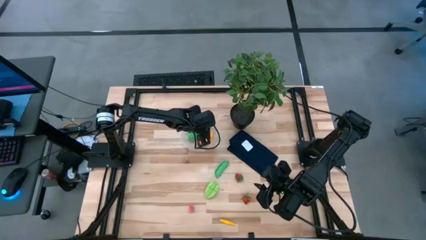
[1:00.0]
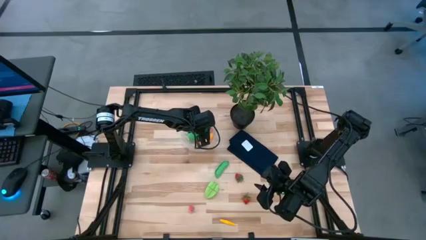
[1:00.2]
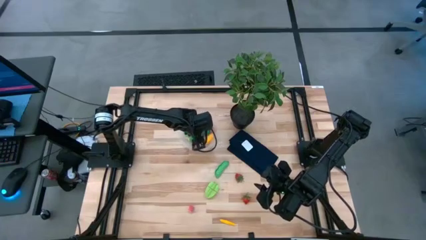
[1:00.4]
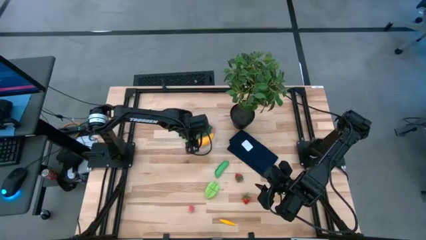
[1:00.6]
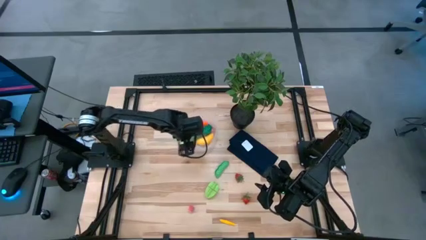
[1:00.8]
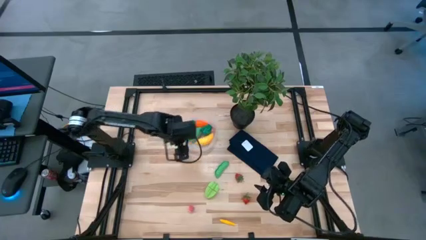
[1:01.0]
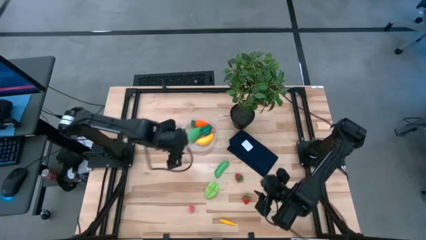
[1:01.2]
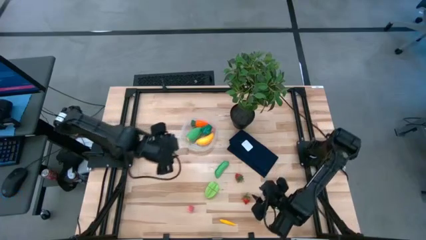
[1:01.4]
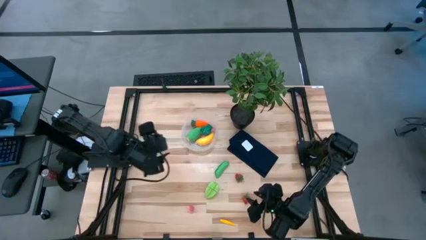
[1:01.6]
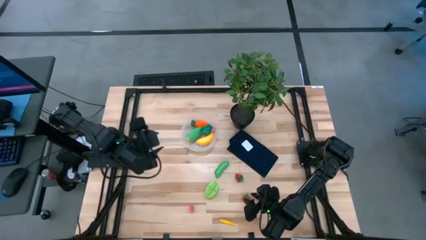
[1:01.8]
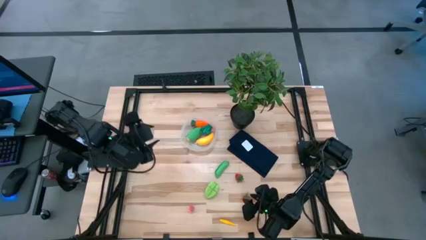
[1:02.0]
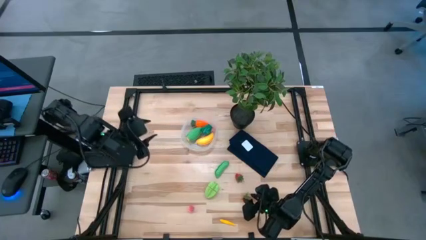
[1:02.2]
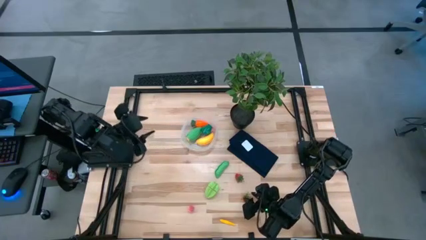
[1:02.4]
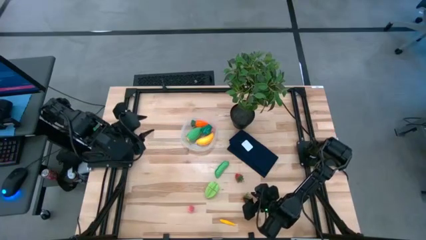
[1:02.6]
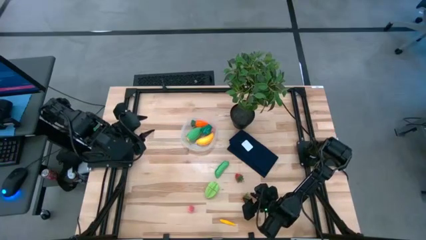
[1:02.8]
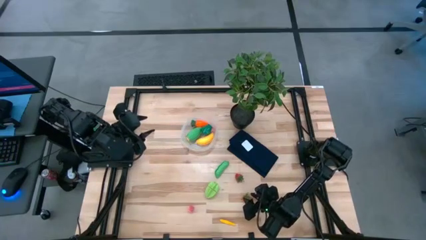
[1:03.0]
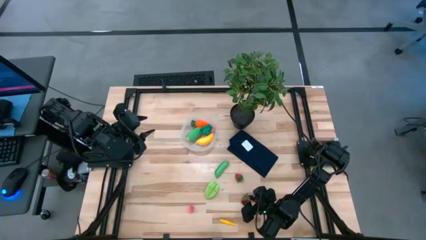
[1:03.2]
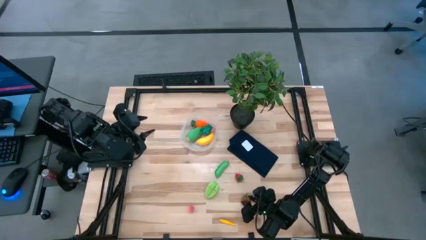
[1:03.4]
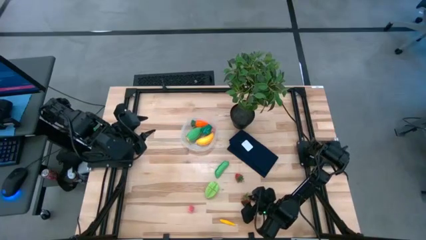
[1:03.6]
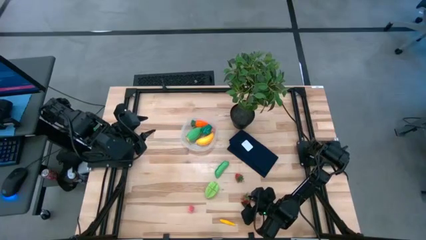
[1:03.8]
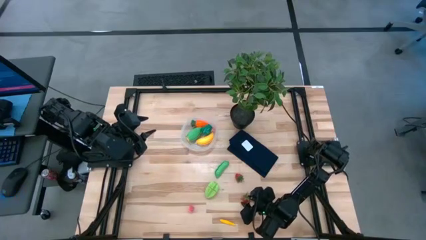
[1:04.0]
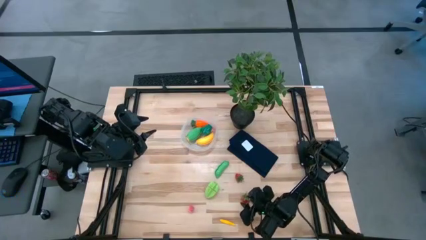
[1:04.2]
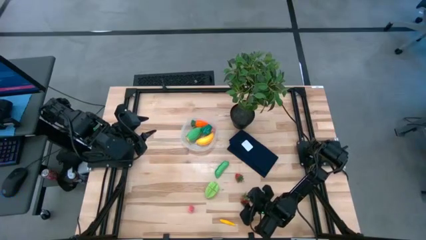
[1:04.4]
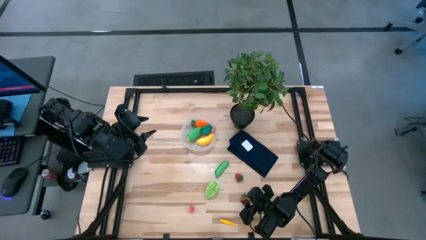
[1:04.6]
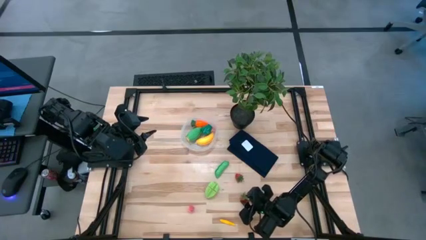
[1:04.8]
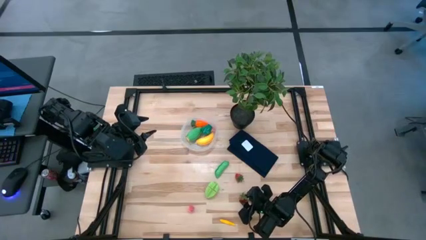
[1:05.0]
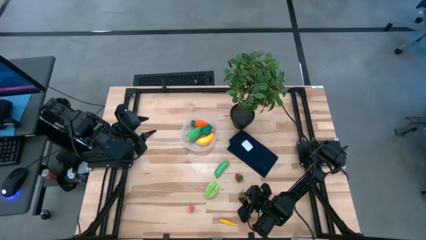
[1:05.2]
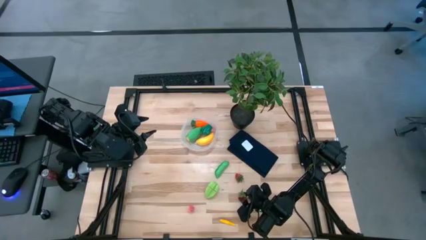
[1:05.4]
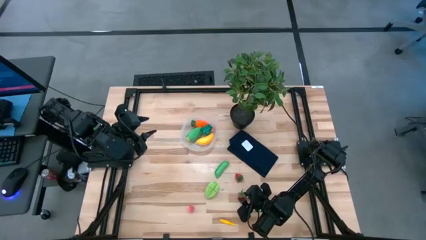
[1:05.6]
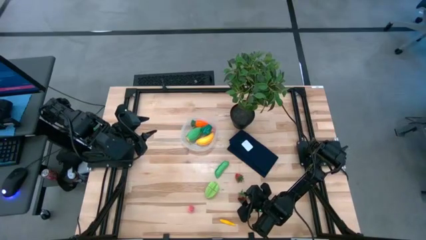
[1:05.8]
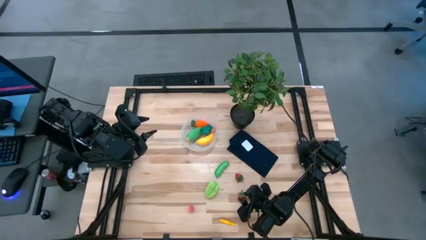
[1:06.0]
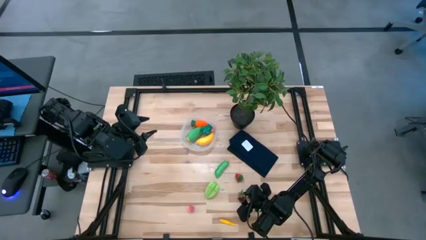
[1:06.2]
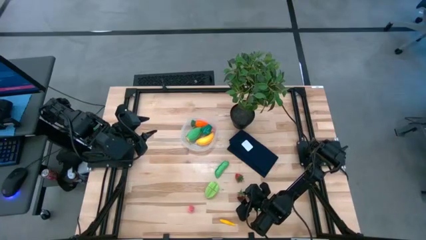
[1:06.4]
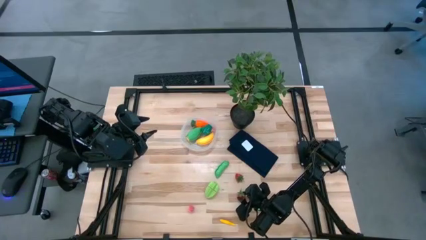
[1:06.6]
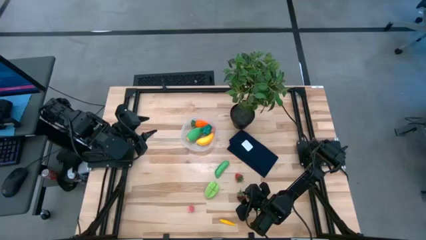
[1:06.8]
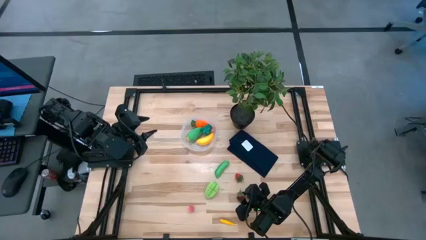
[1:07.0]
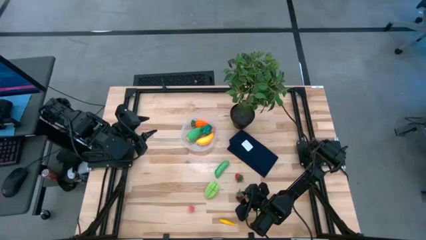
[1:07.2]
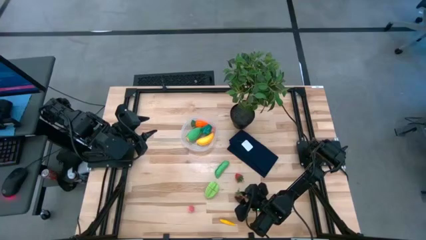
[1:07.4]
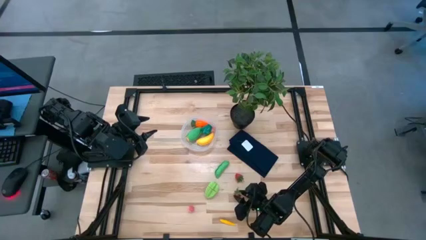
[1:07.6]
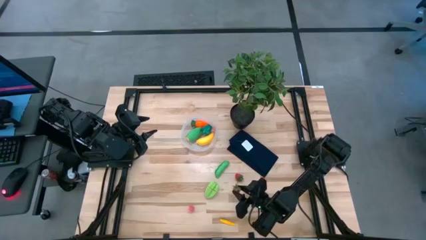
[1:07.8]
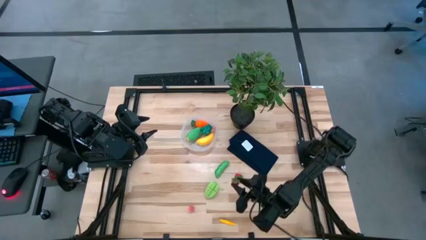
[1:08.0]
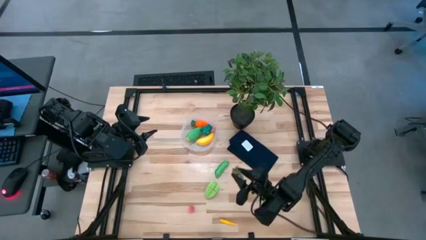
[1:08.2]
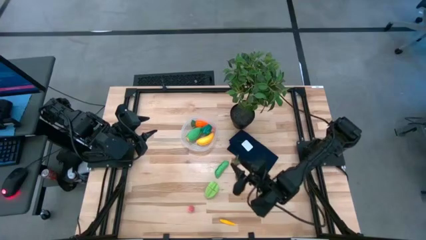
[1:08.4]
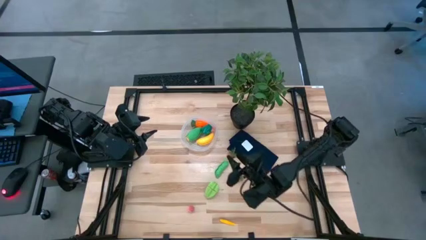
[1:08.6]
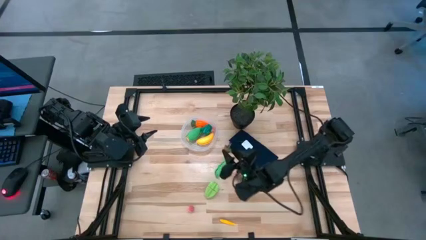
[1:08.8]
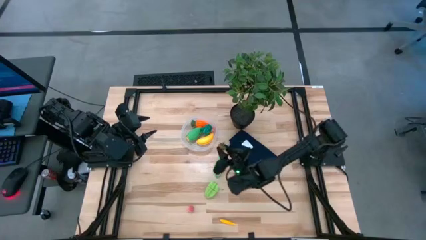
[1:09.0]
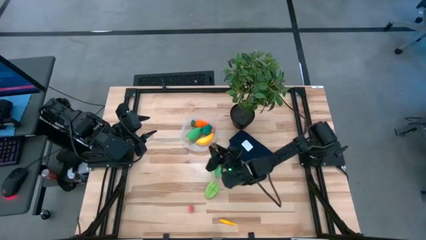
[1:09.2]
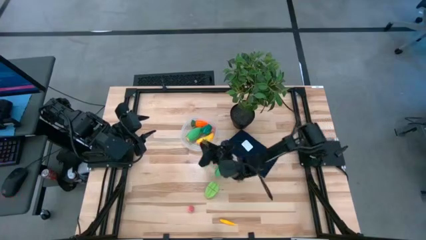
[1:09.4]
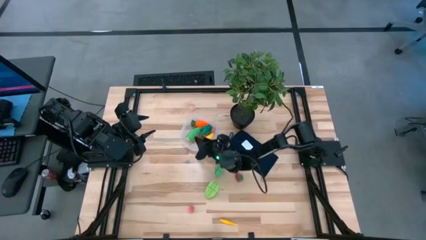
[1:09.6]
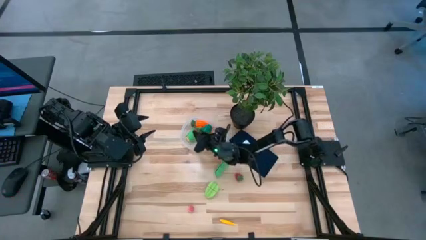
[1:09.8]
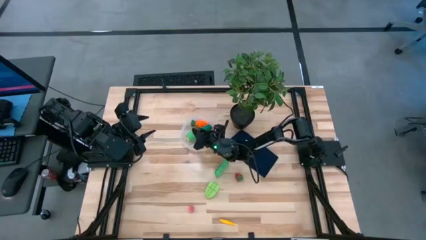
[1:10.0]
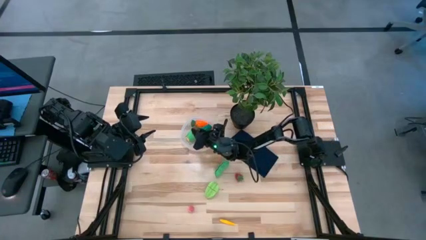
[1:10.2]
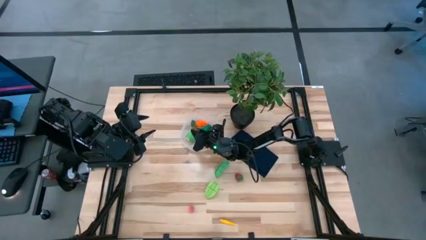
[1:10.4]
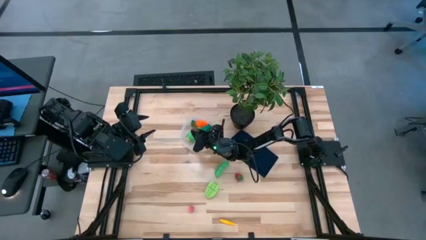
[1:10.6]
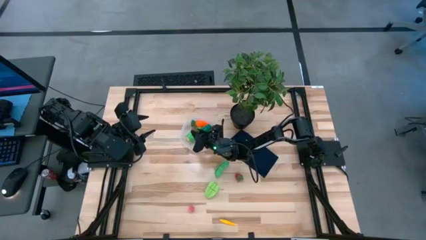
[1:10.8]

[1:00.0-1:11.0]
Task: Pick and placing Produce into tupperware
Put the bottom red strawberry into the transparent bin

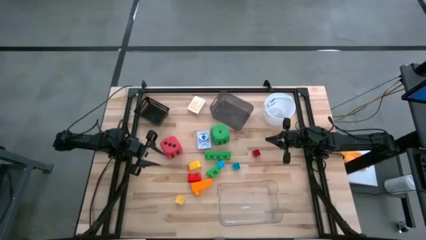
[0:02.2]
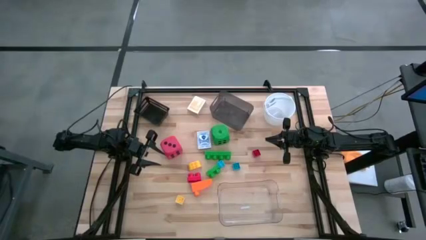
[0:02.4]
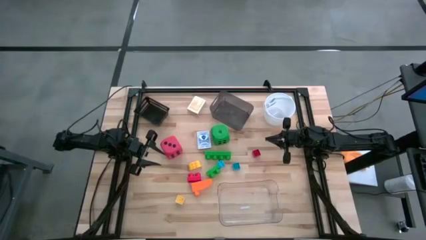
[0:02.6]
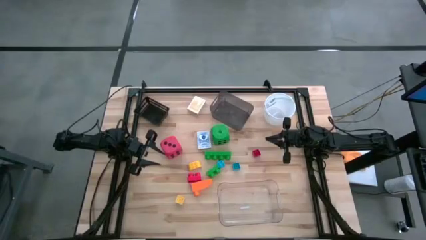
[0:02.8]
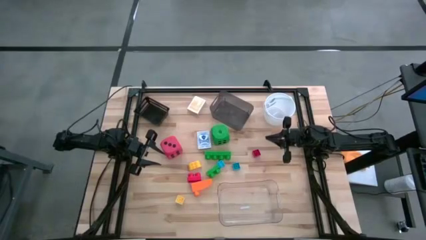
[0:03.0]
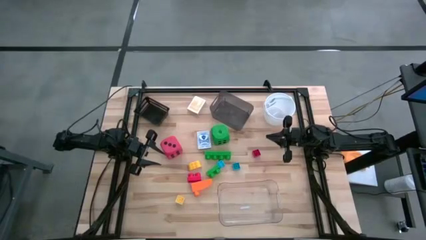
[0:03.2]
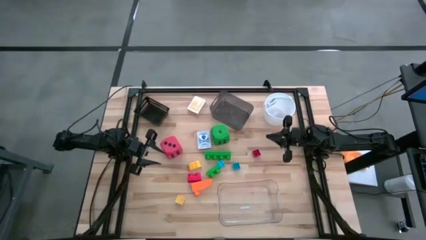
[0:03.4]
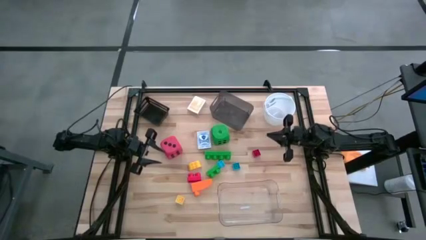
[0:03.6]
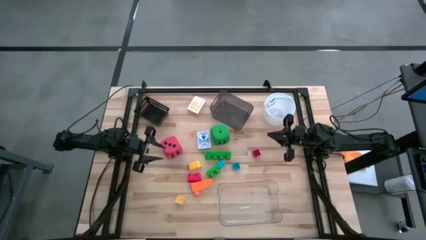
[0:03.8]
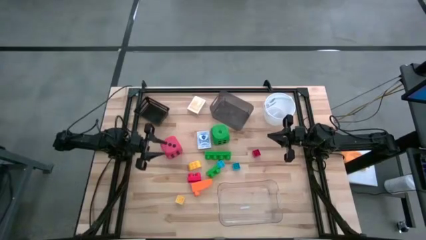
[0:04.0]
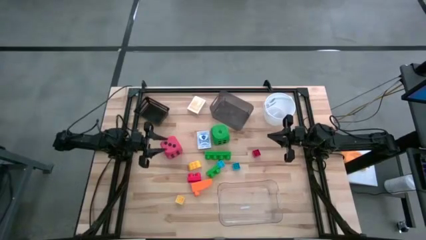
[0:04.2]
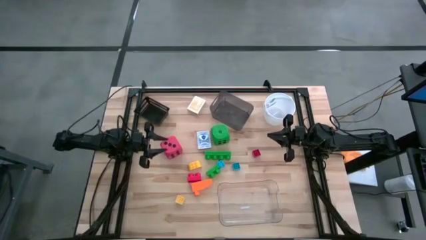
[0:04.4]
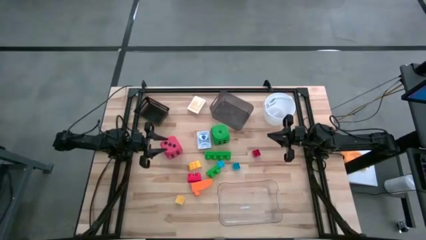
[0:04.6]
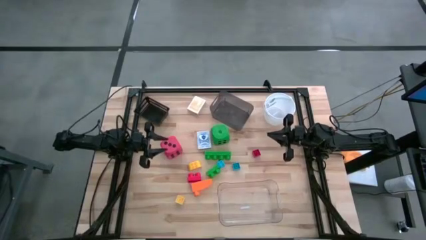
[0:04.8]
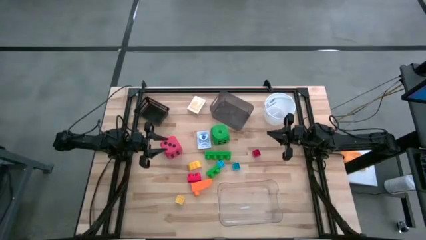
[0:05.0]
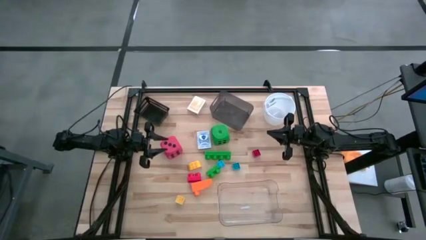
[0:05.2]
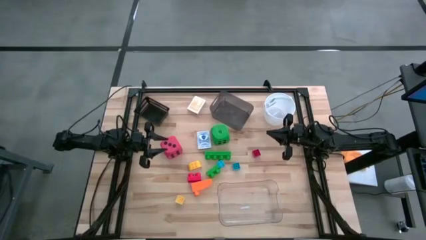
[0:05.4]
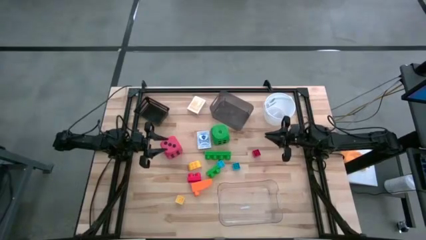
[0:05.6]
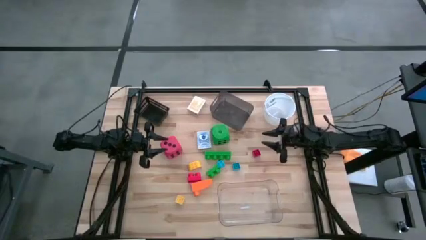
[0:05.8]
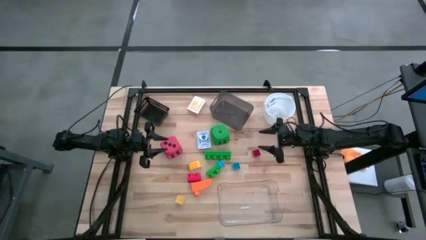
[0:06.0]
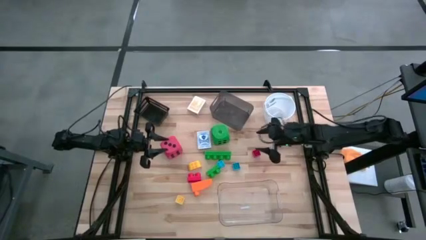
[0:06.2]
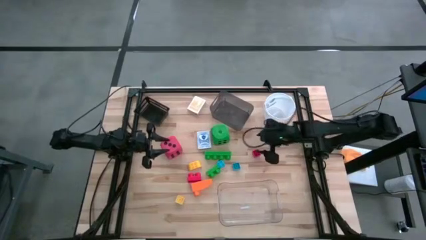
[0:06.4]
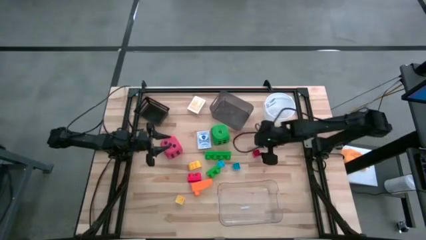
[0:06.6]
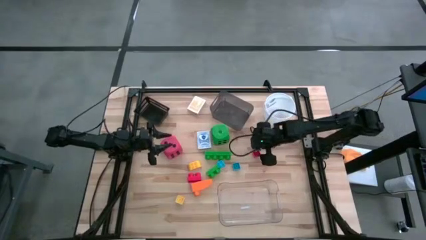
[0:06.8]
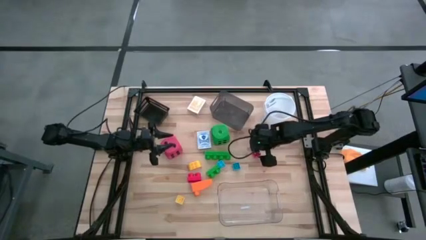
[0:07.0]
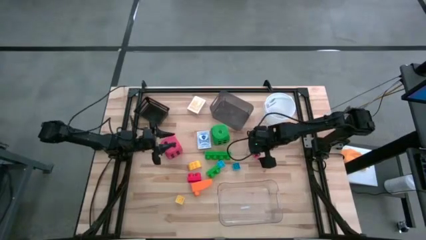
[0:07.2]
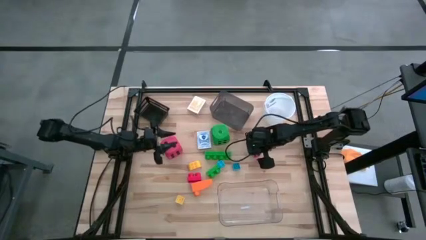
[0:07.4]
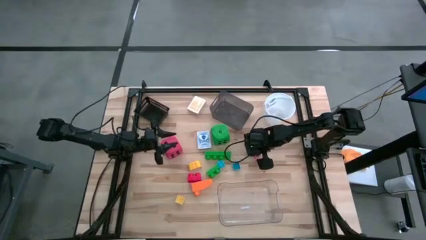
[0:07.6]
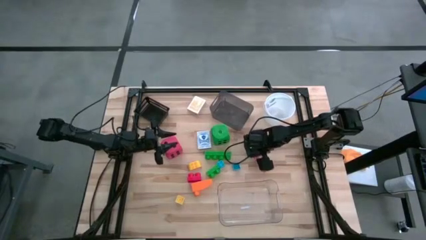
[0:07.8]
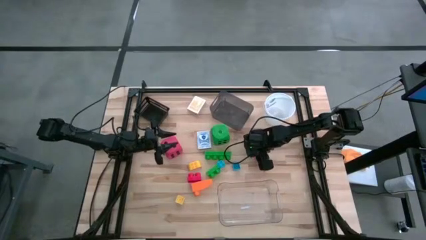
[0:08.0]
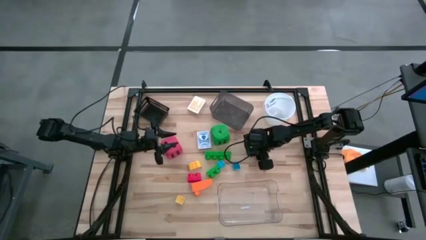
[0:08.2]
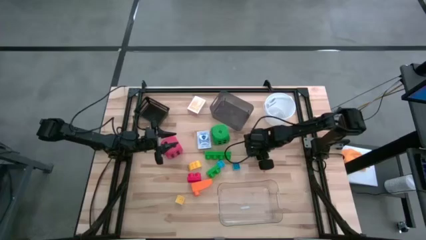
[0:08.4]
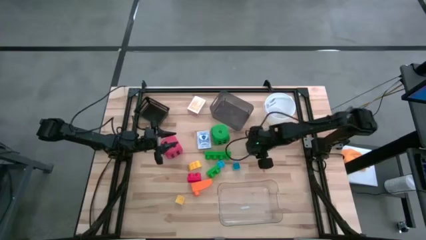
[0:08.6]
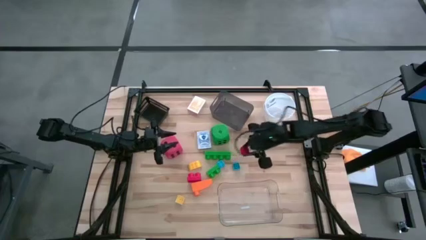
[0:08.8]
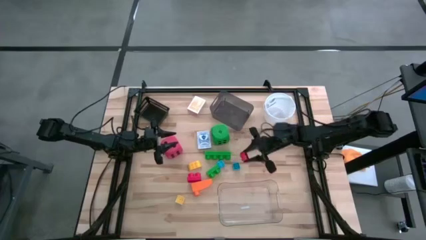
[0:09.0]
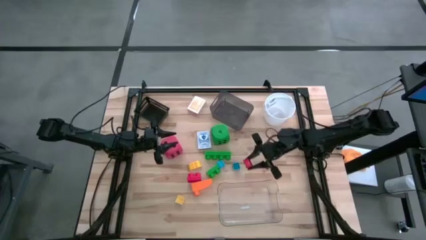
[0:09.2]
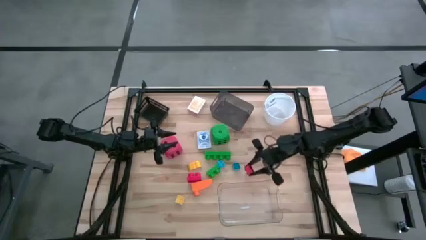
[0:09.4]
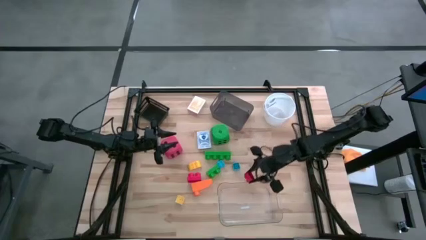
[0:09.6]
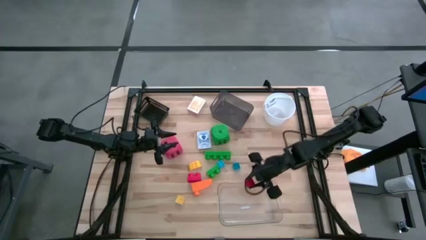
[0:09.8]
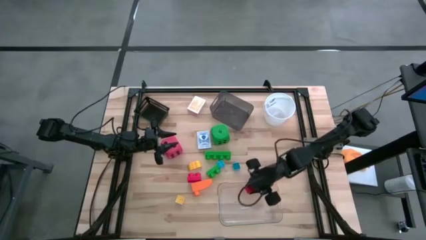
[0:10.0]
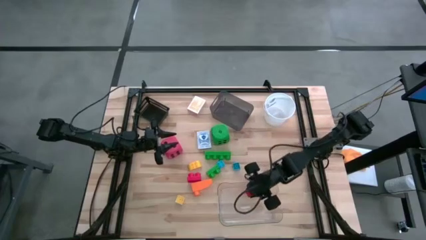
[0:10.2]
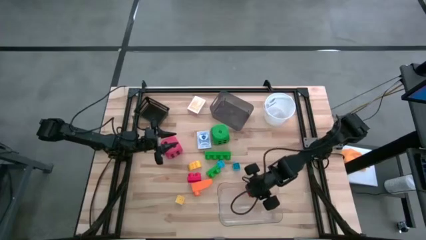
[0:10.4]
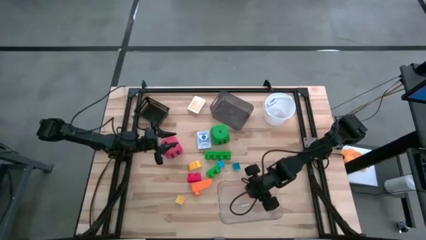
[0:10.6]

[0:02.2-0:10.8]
Task: Pick & Place Toys
Put the red game piece into the bottom transparent bin
